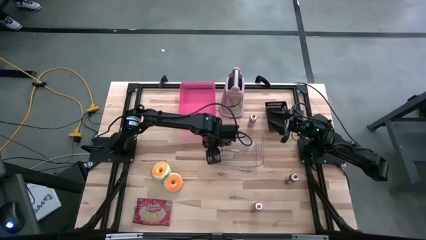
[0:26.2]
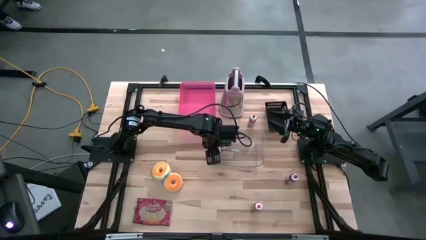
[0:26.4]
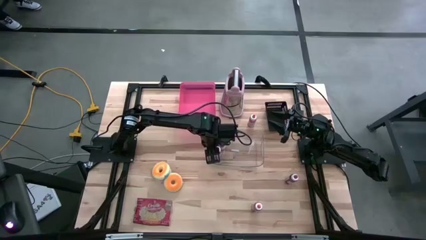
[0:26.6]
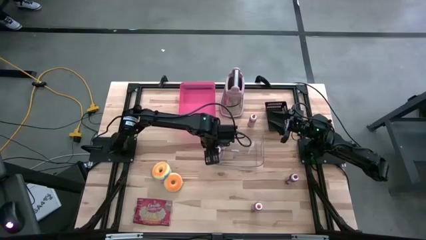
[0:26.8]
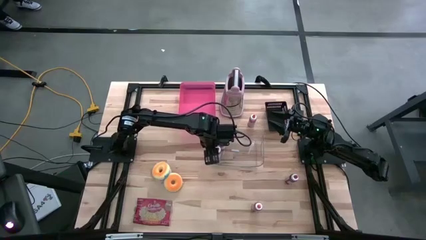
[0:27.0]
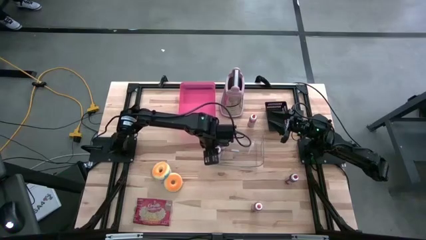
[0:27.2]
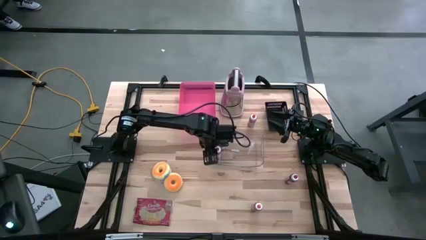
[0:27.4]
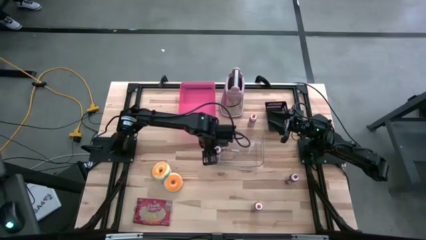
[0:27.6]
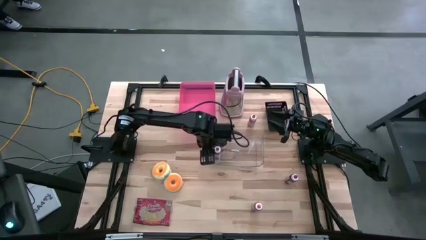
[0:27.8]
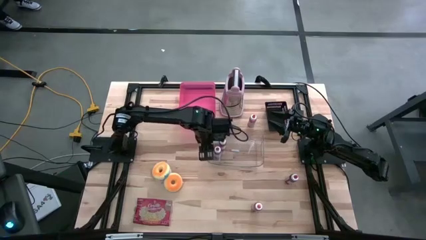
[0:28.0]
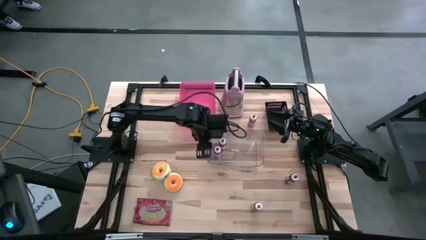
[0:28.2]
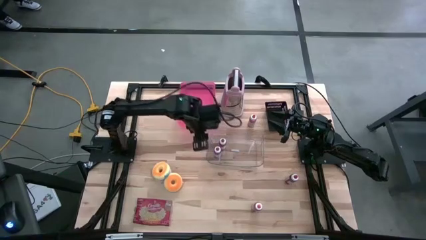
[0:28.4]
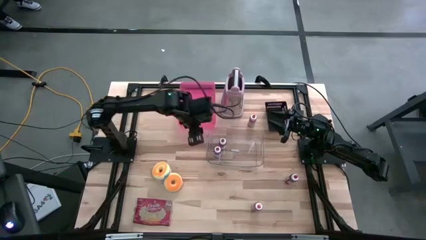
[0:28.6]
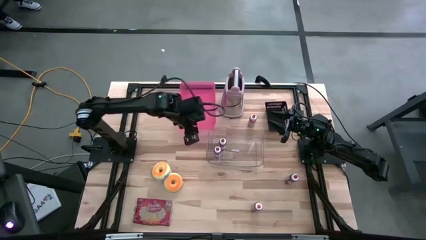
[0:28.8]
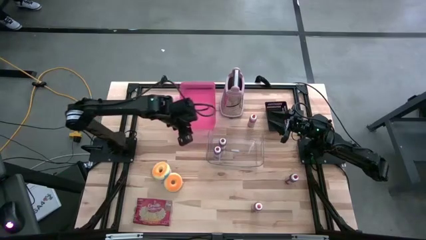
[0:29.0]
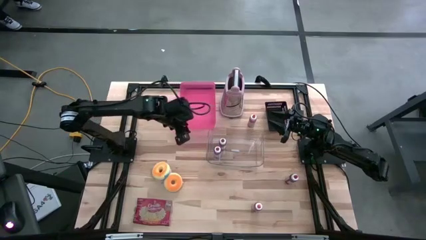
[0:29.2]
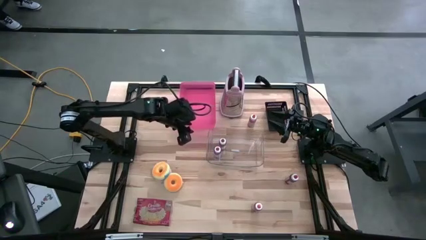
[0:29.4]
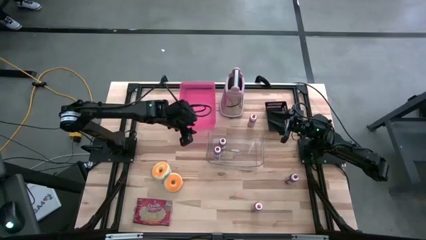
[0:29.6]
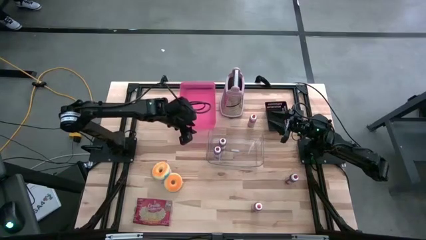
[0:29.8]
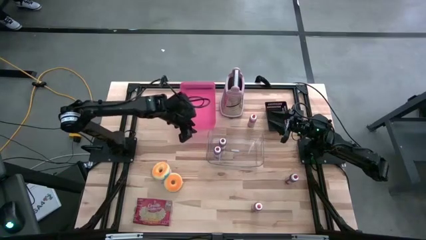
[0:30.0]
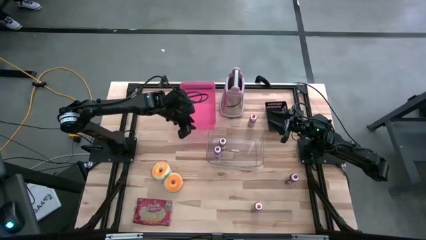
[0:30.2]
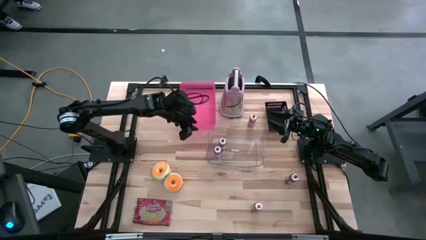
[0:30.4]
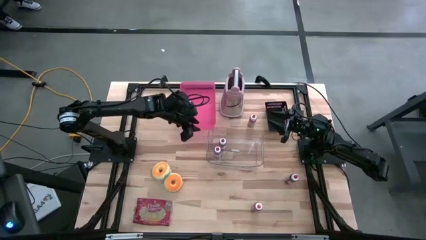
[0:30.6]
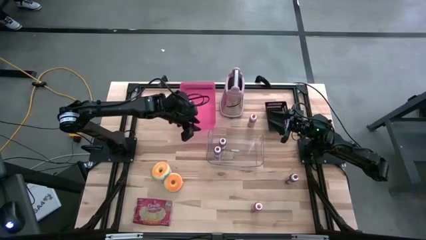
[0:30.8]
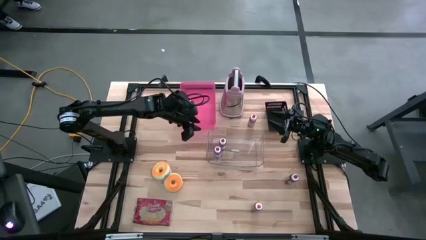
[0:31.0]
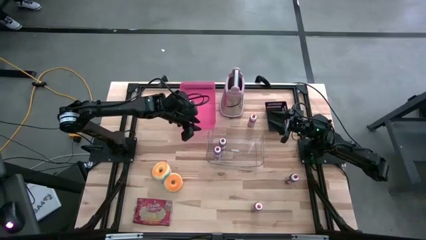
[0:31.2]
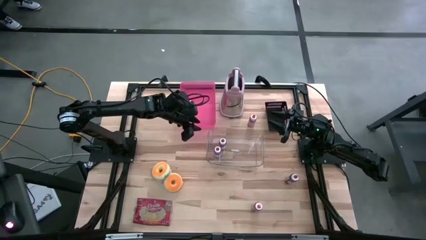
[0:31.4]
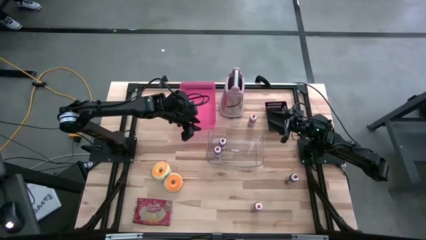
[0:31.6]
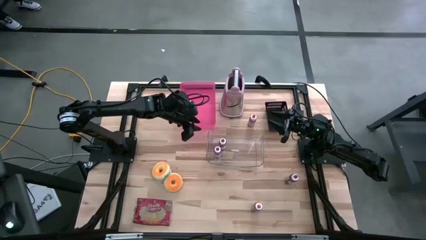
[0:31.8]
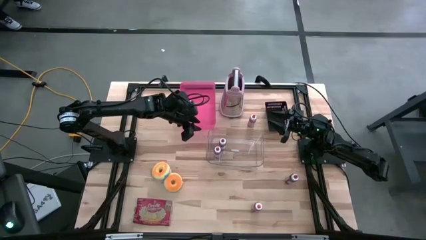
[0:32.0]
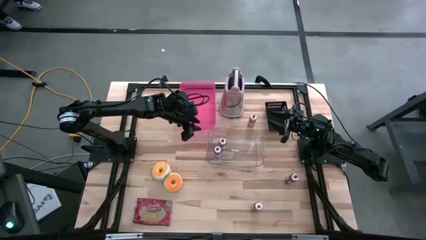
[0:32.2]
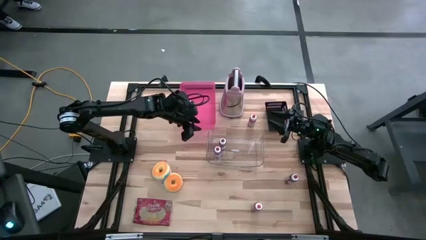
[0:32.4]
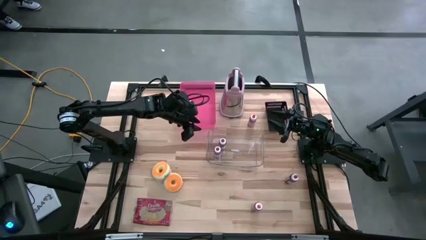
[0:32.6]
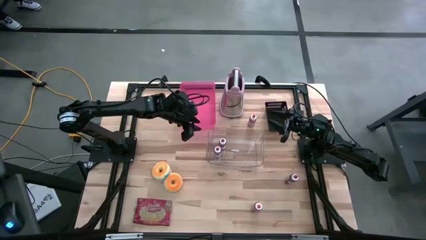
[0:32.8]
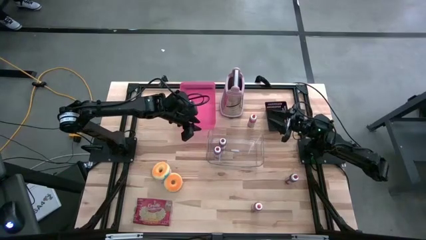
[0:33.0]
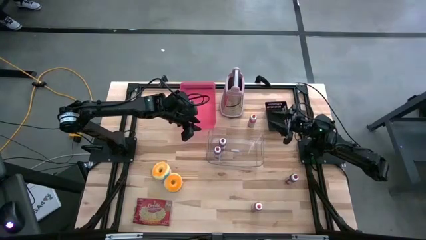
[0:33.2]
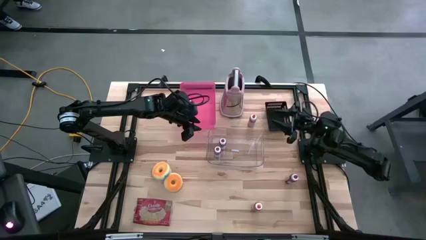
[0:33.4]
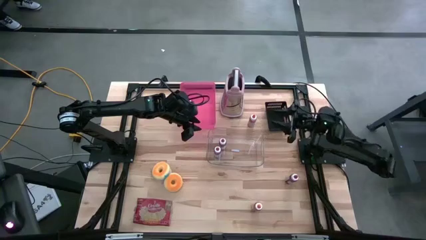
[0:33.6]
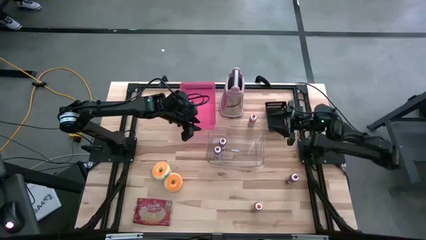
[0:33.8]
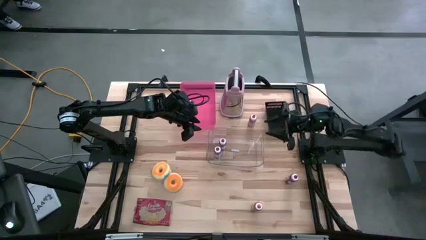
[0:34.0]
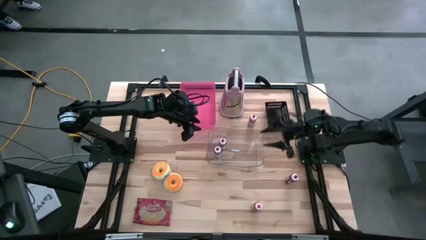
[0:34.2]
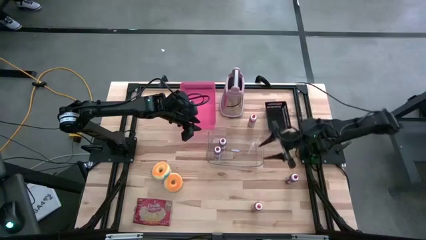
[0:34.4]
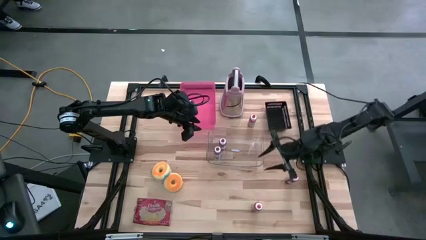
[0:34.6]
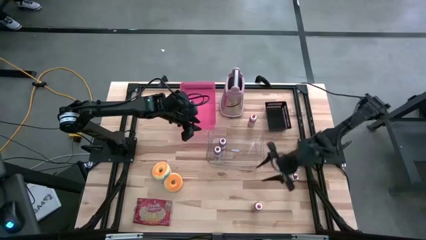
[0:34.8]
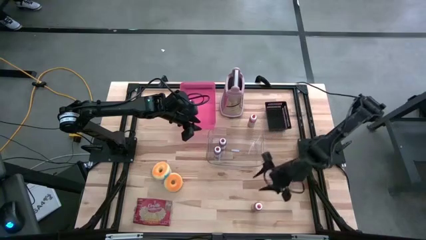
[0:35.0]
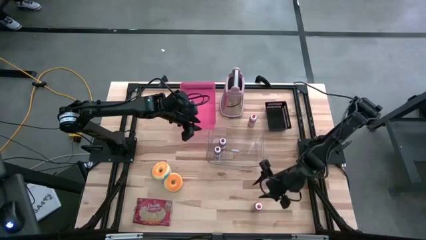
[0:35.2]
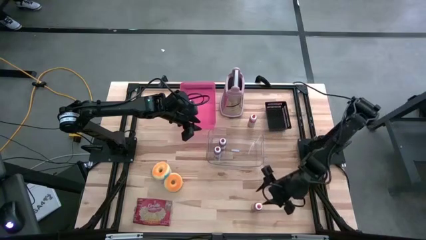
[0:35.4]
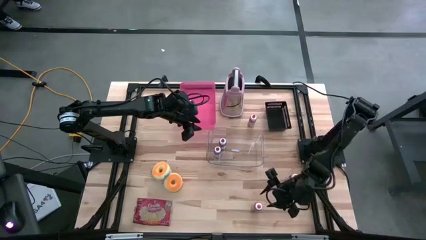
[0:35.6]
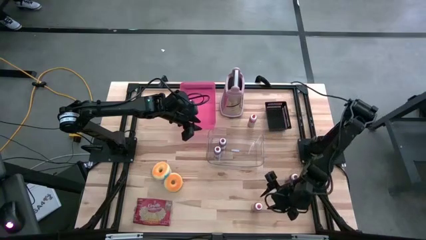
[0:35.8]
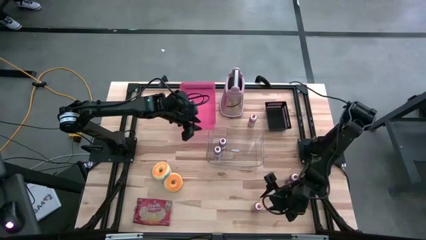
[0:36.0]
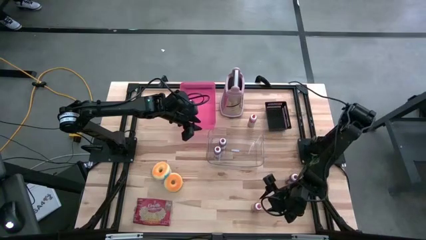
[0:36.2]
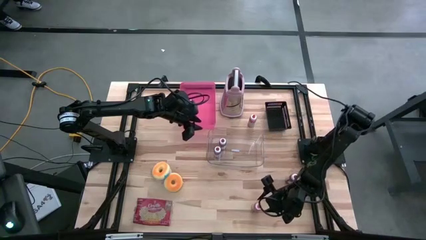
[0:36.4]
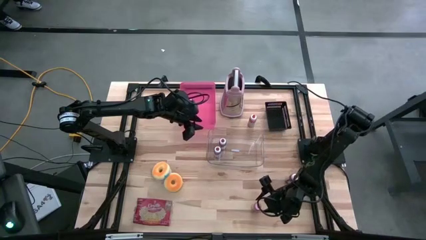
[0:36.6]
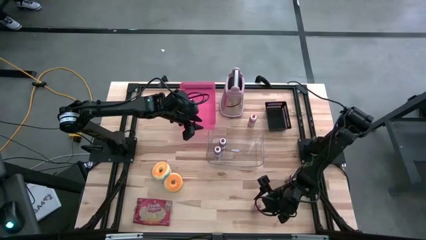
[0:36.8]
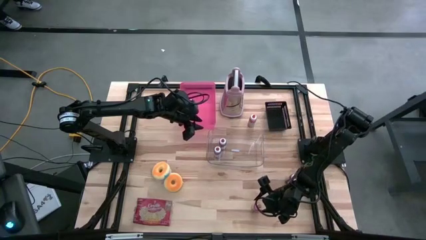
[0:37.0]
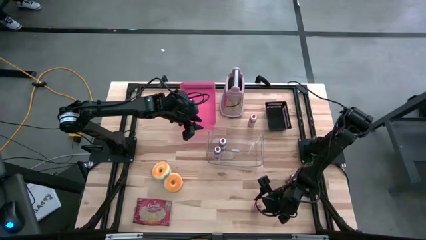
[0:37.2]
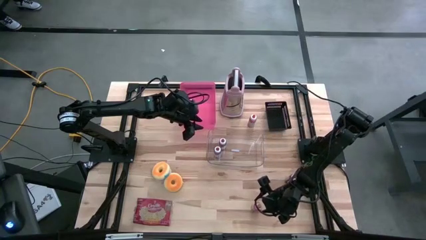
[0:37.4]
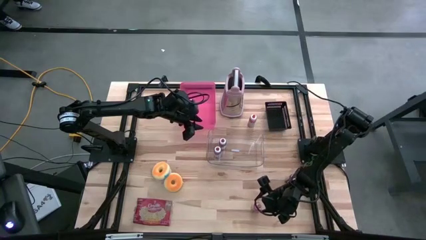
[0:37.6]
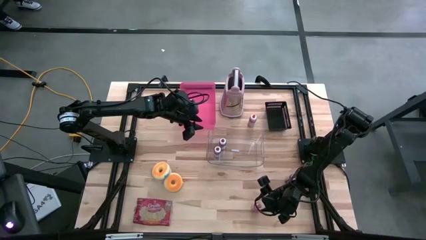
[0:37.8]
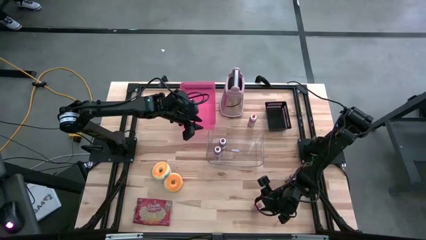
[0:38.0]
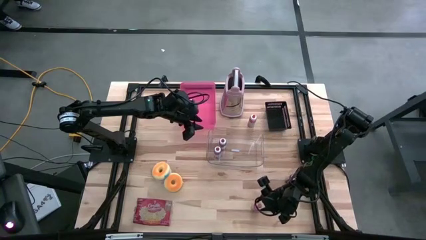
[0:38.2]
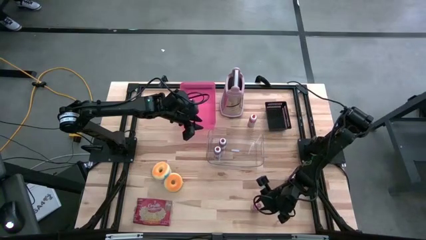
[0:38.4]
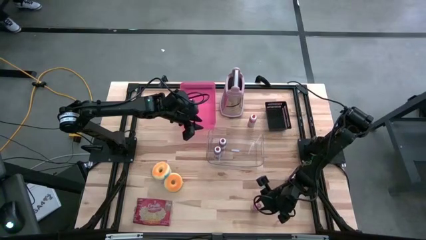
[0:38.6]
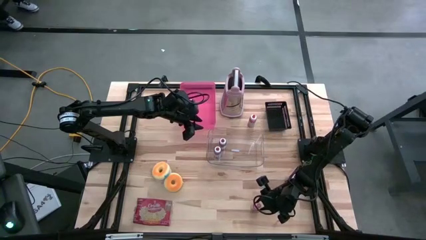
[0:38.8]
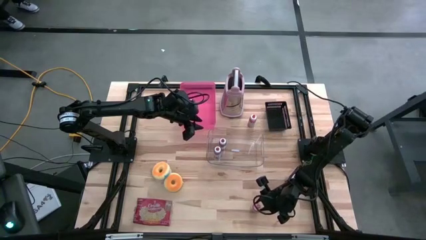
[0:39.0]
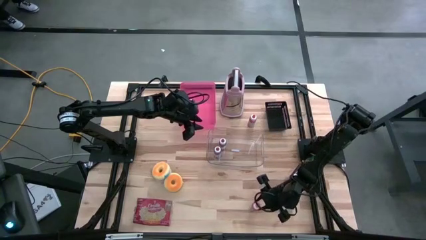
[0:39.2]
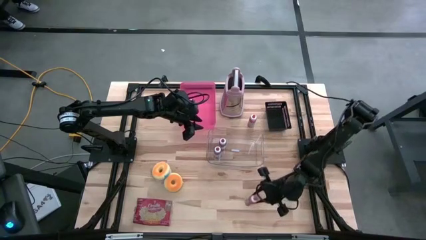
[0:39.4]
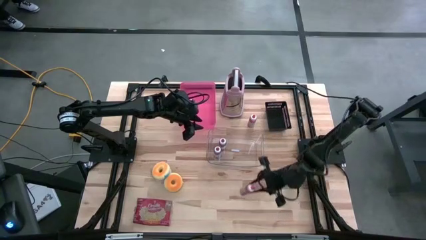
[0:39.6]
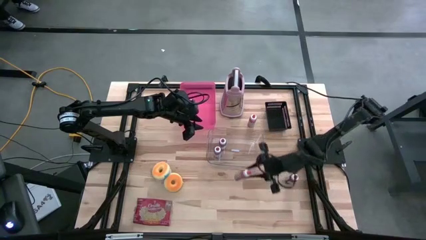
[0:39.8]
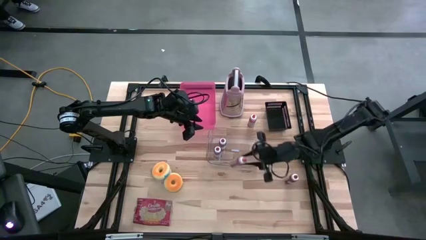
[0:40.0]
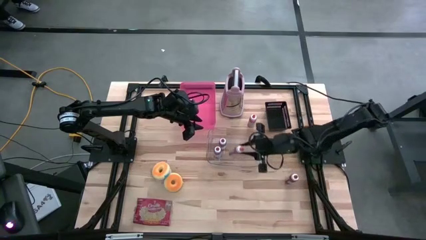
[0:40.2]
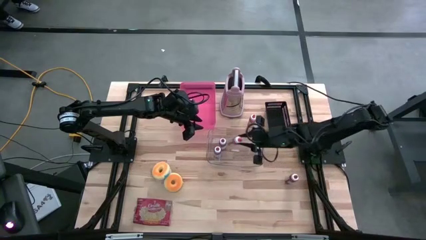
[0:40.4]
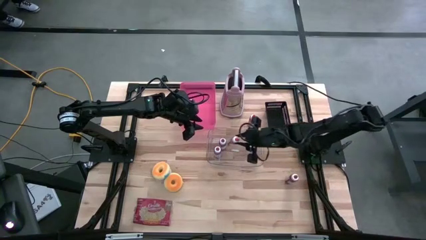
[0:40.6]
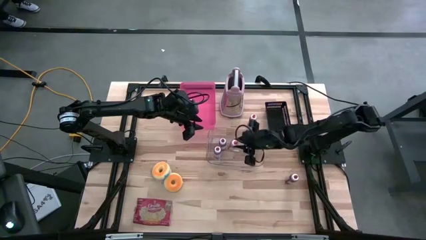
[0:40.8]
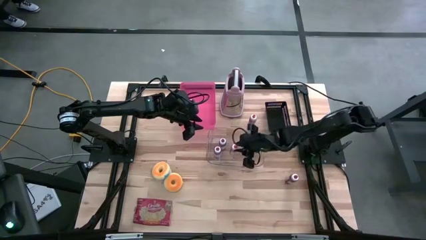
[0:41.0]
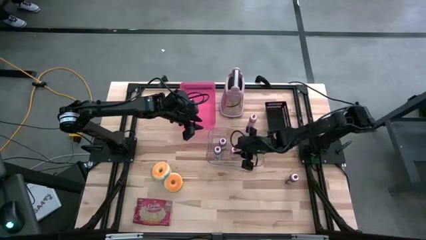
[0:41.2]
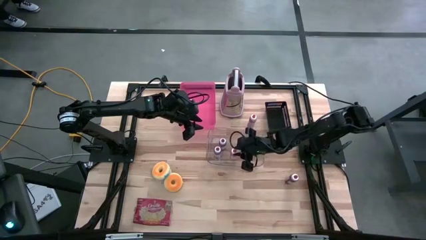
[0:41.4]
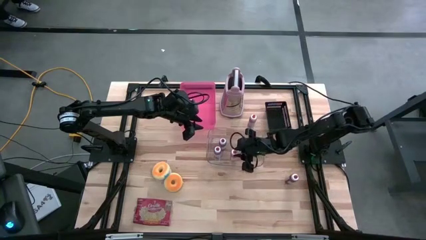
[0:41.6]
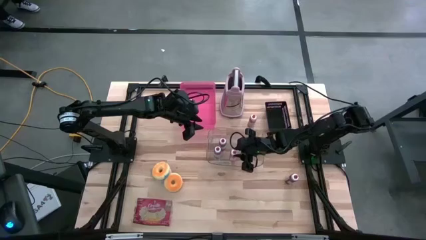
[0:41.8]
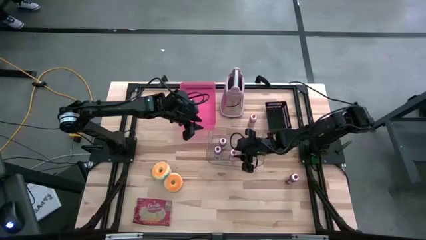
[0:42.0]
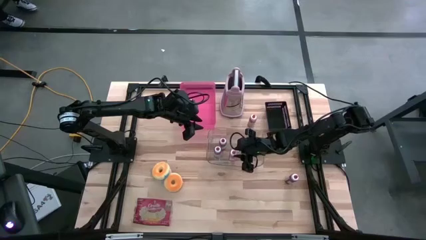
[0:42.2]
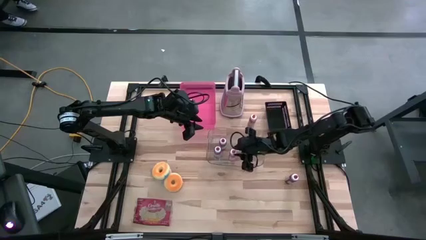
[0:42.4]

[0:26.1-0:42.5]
Put the bottom orange food coloring bottle into the transparent bin
